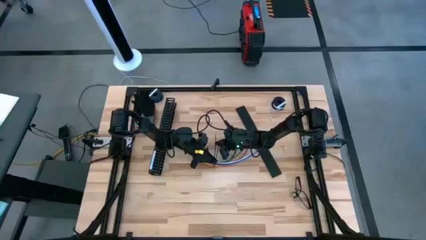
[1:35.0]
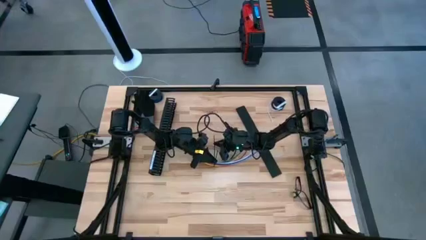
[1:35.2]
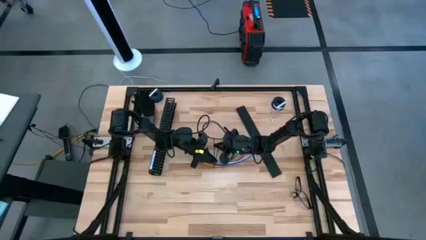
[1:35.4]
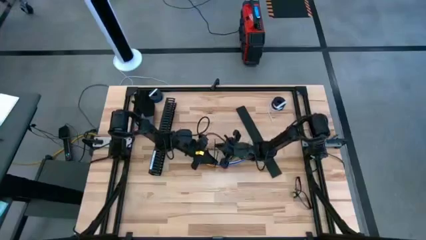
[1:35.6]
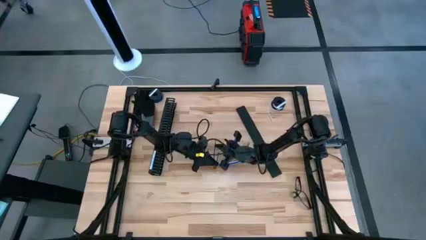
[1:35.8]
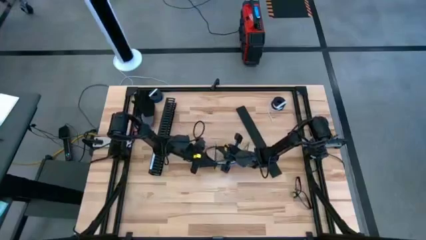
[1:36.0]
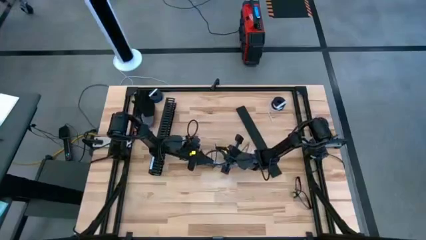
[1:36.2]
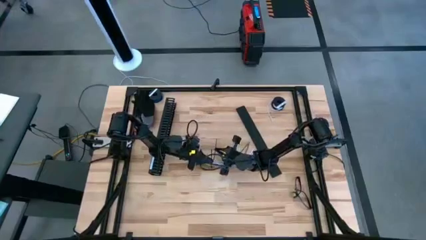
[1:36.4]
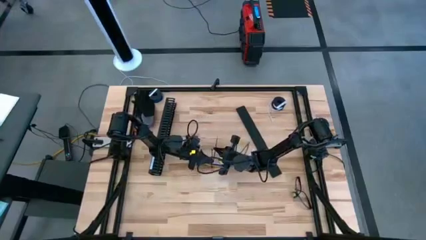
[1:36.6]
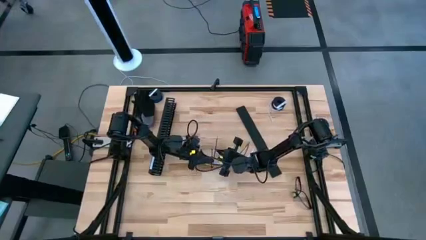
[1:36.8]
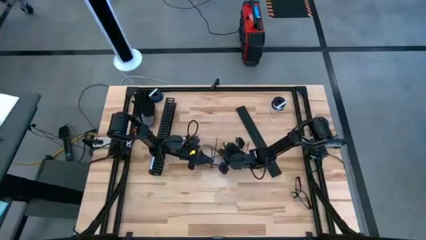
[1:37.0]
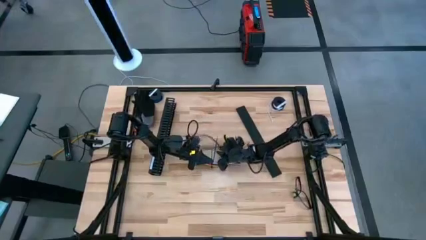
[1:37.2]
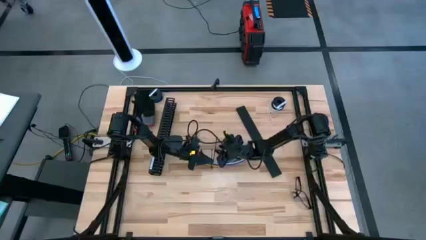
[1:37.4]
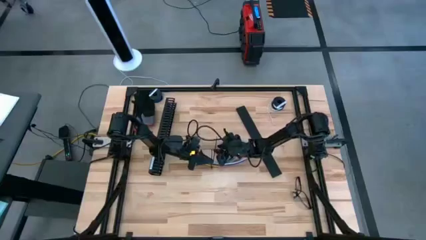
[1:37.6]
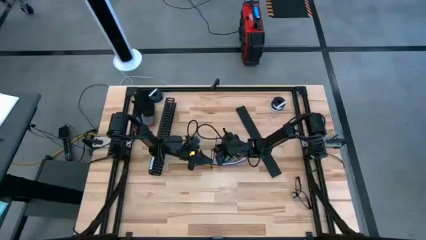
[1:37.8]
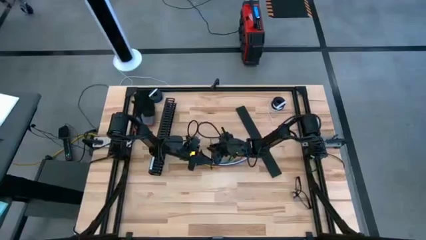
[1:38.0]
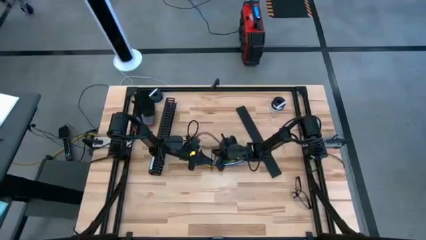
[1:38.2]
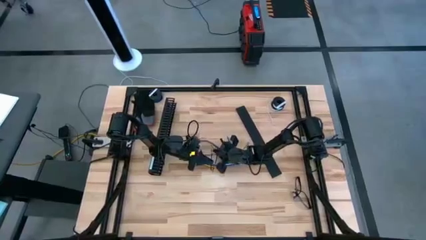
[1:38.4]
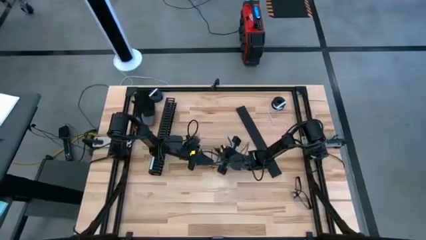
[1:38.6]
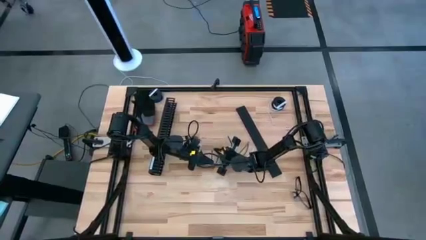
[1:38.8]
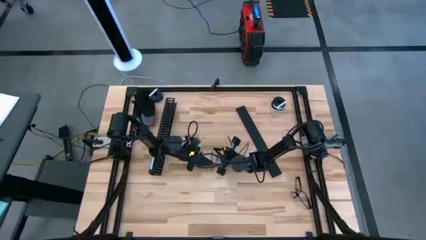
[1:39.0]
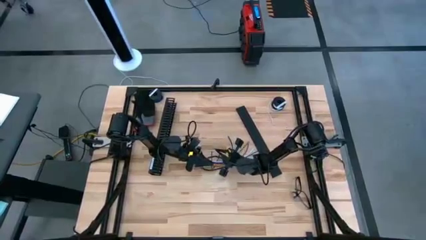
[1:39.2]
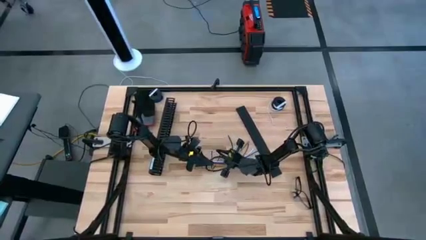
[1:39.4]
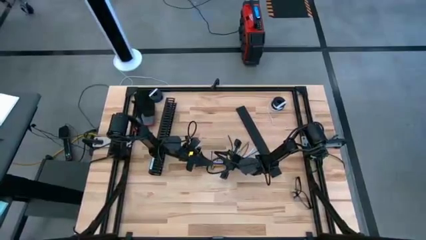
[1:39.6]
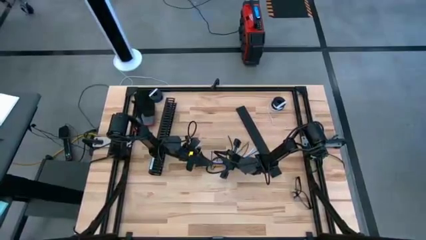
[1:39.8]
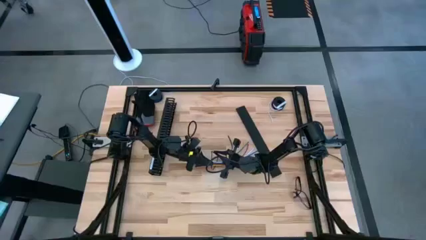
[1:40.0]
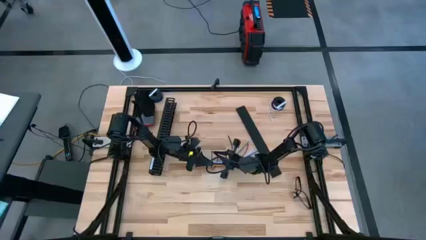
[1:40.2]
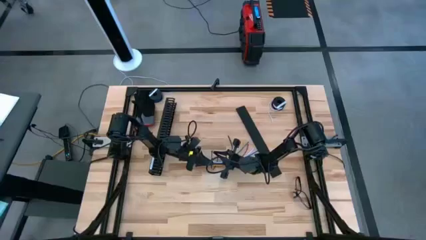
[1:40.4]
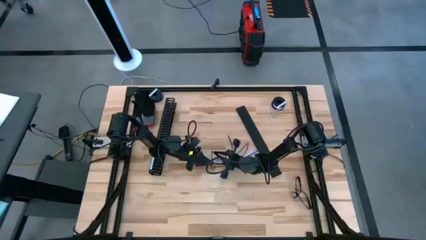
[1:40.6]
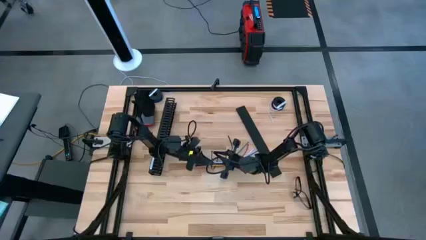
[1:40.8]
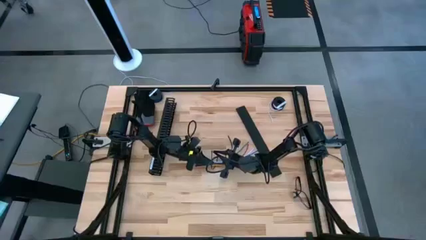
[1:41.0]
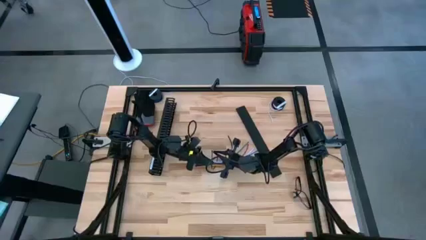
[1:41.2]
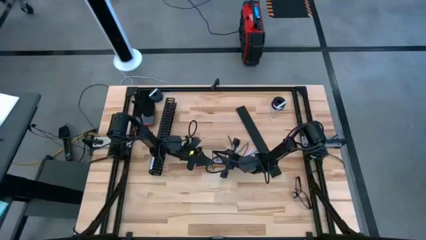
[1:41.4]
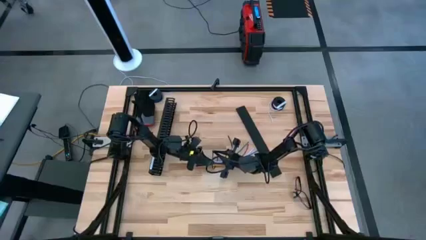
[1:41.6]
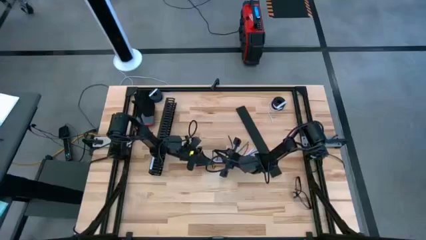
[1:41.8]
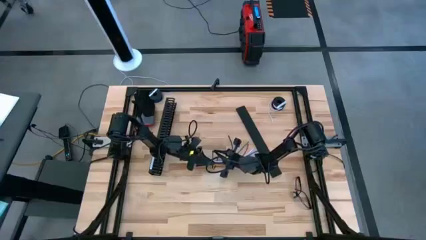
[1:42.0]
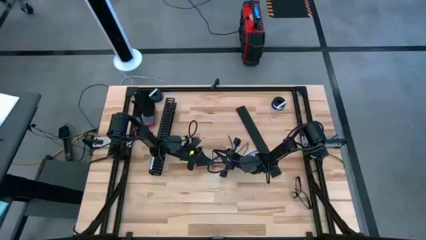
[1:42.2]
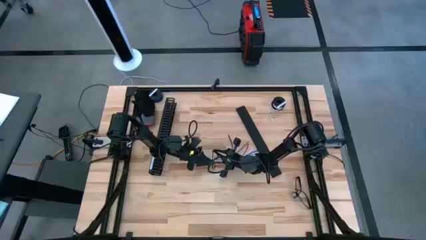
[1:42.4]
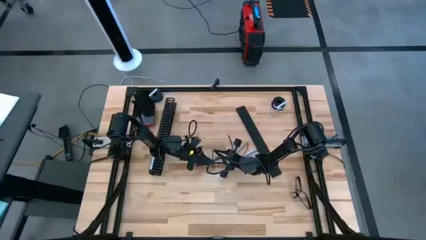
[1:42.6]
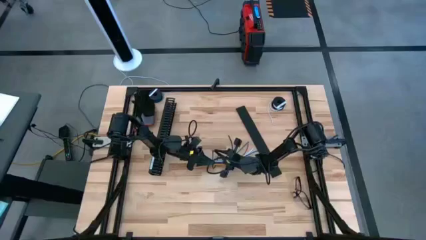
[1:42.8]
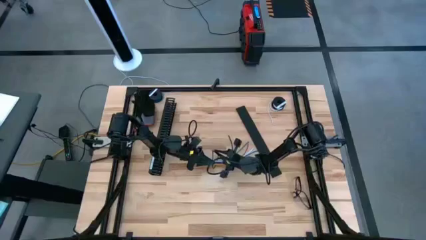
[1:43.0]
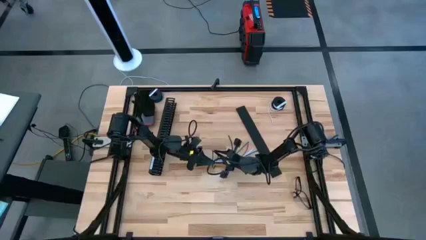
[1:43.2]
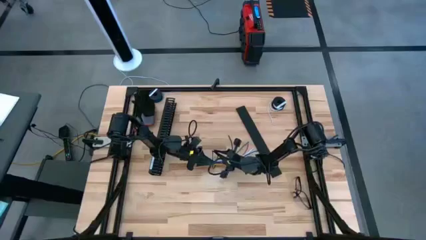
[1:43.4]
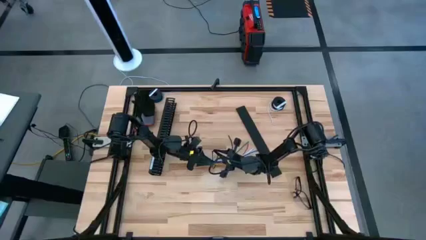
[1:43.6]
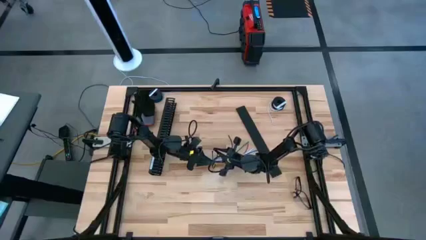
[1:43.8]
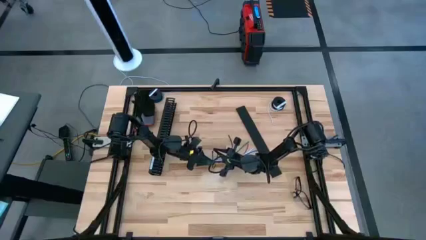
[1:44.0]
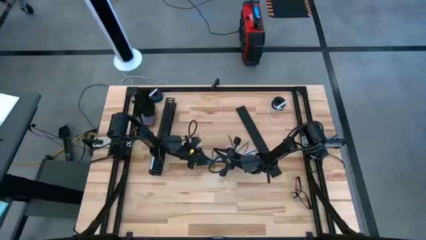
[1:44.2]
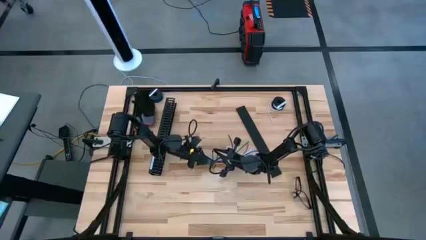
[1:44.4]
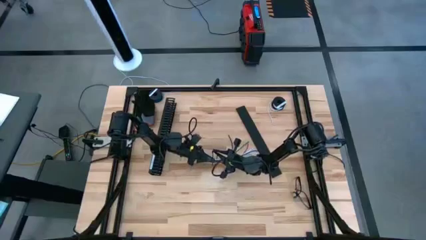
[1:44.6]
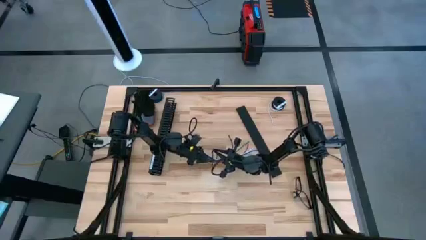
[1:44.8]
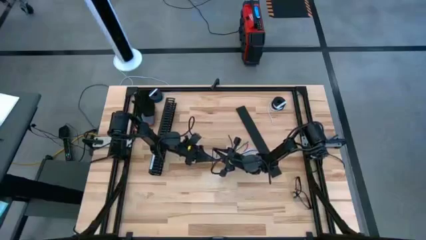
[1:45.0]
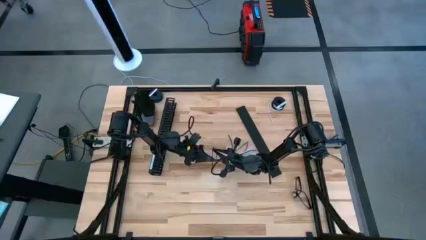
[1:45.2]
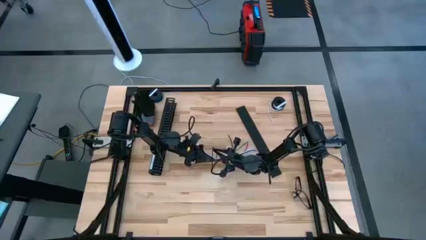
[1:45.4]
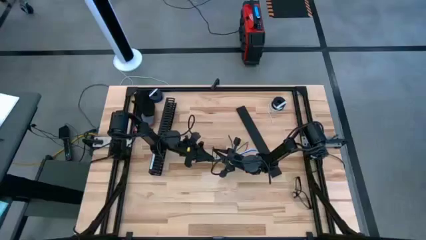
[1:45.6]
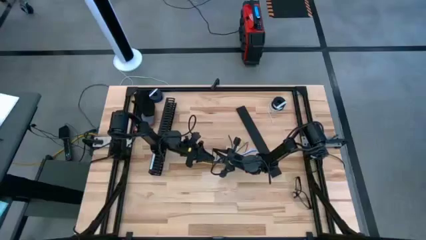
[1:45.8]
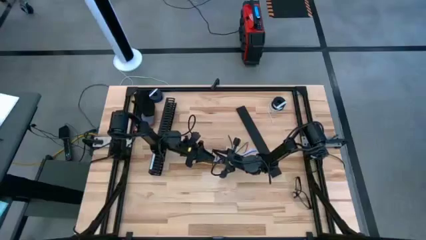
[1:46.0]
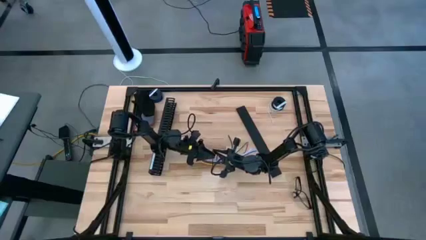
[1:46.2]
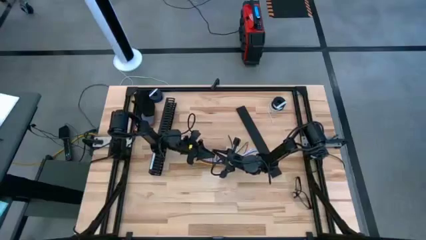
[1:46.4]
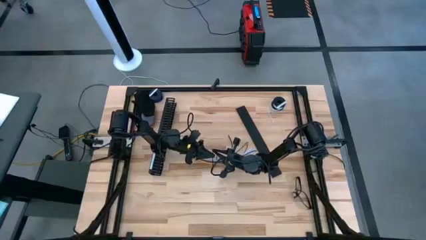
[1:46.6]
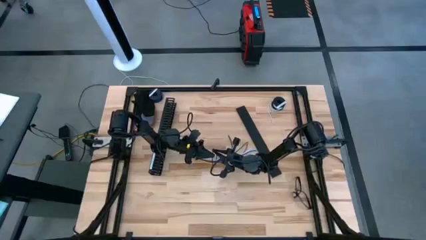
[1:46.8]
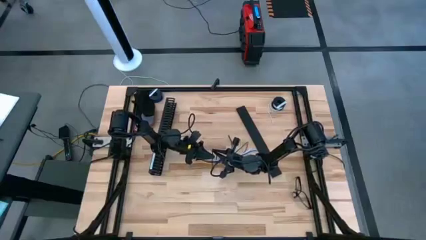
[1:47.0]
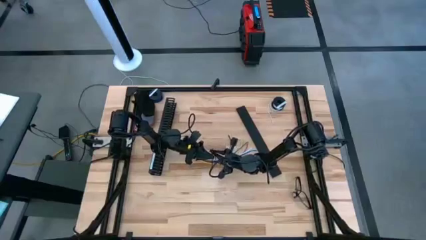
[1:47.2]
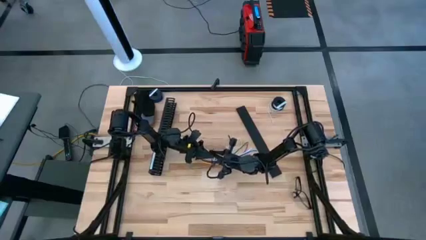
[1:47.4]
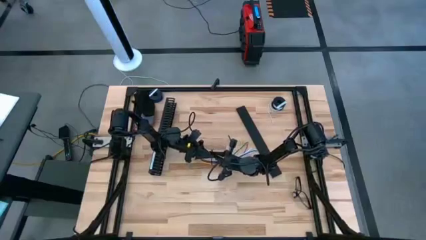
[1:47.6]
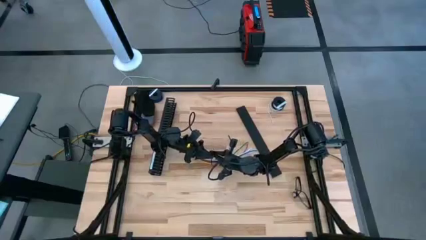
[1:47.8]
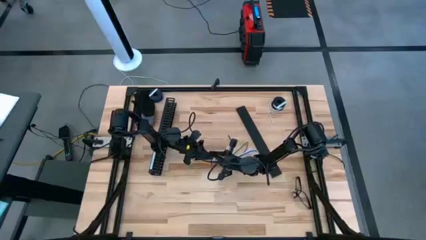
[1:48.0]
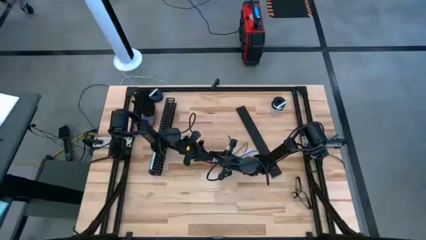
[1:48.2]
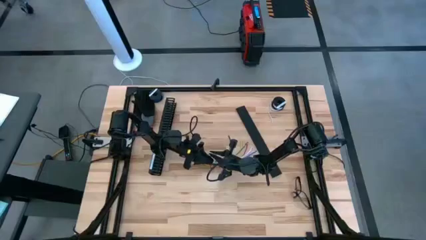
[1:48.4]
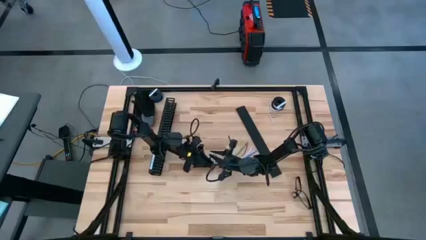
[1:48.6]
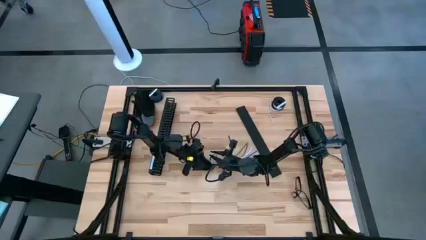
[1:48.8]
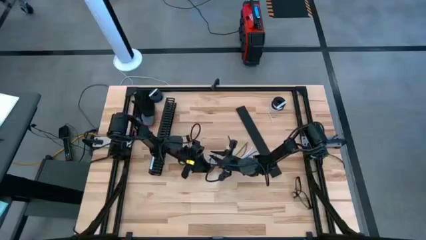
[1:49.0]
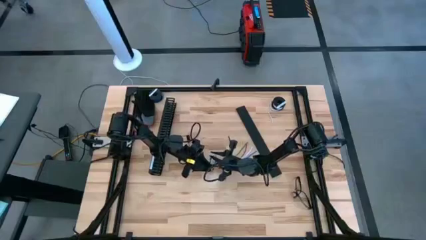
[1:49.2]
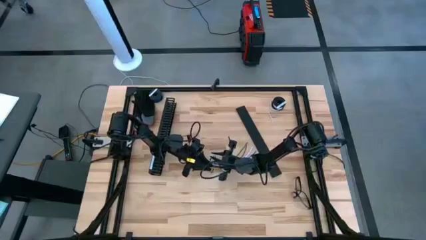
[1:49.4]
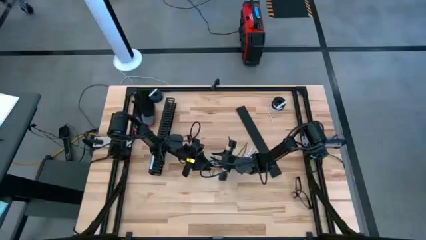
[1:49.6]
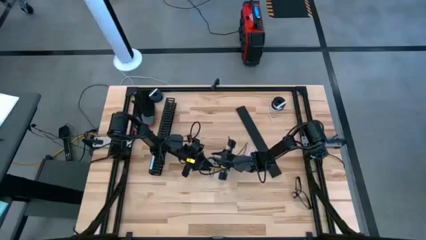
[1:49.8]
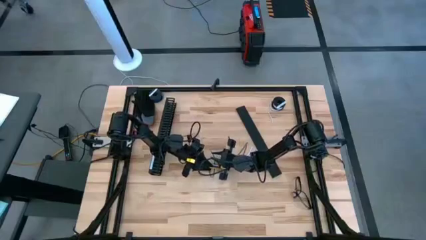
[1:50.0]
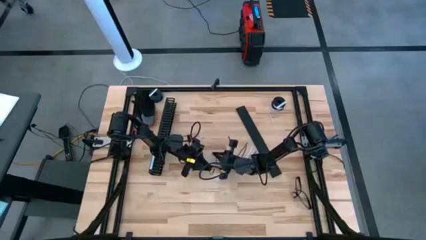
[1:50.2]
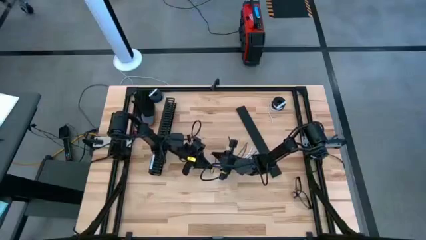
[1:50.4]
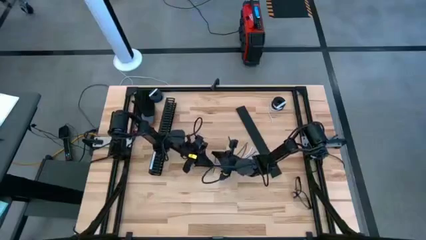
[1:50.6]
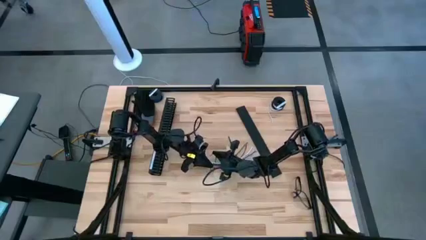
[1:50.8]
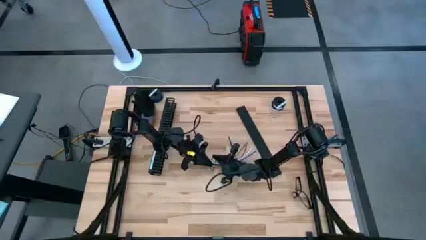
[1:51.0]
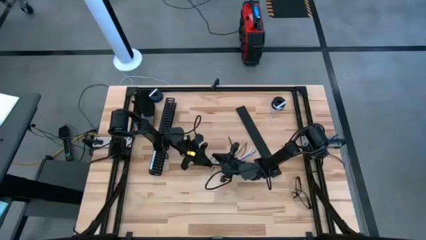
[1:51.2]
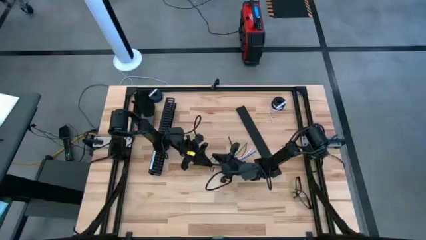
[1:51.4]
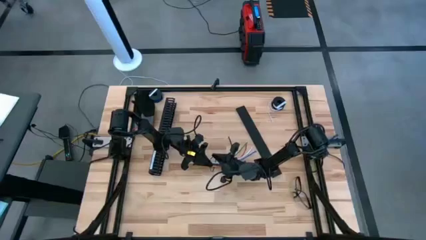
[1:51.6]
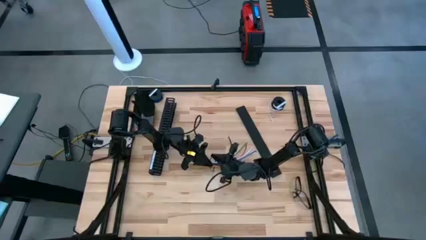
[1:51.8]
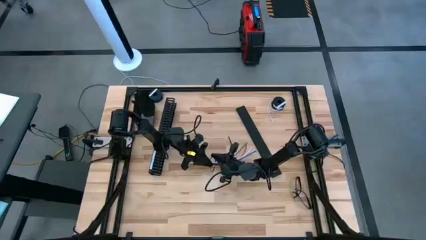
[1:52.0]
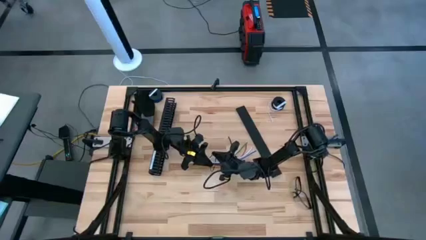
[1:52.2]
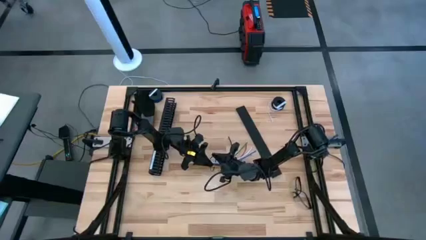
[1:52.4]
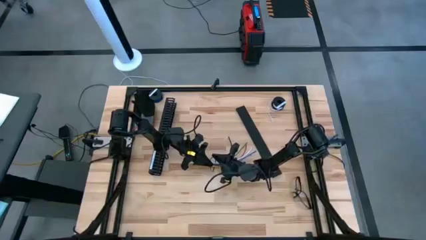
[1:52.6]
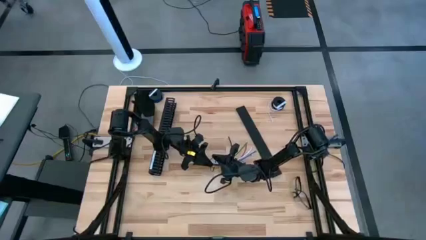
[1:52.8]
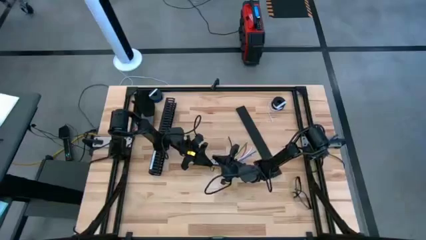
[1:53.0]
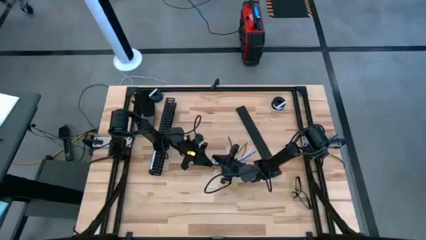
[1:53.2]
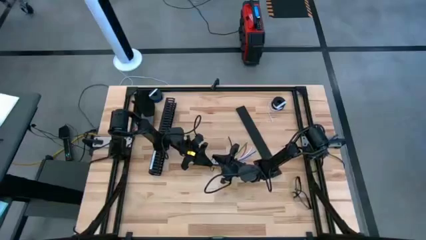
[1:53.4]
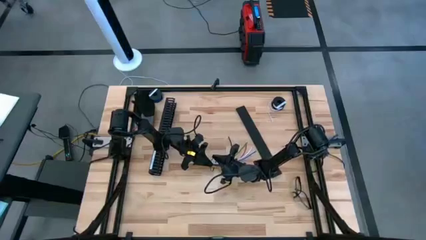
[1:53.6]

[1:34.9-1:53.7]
Task: Ziptie cables
Wrap the black zip tie on the cable
